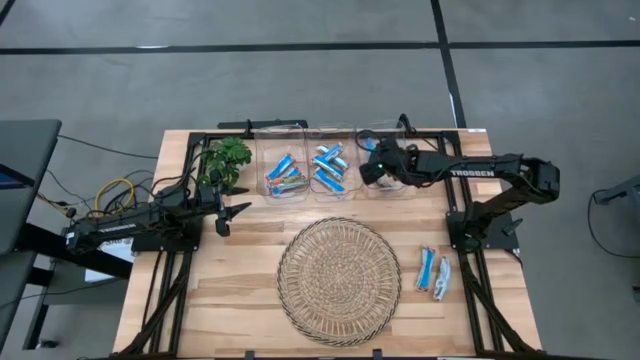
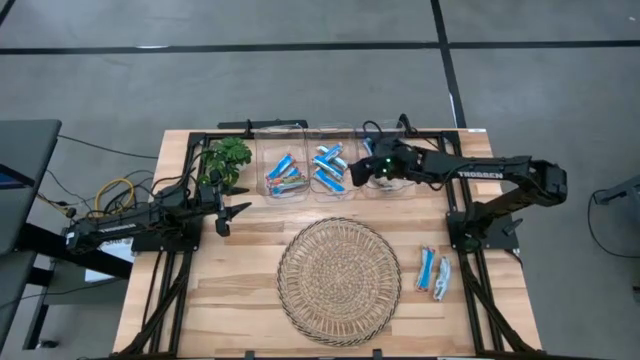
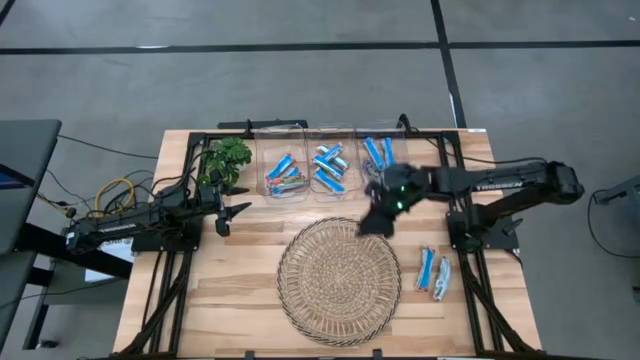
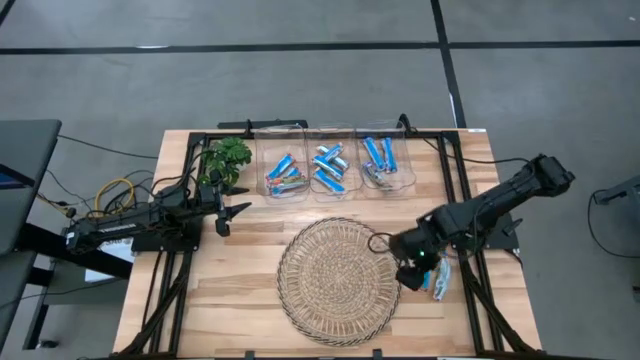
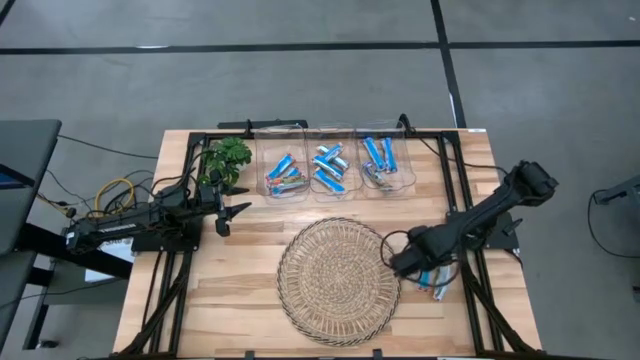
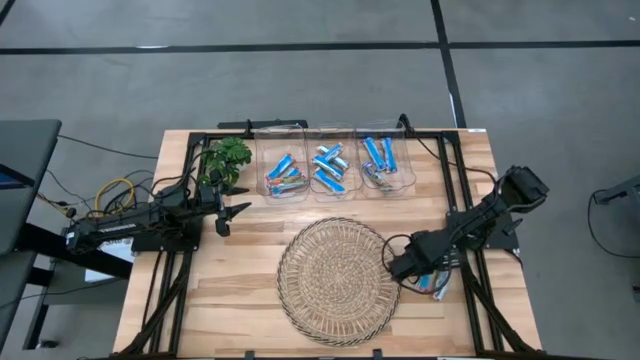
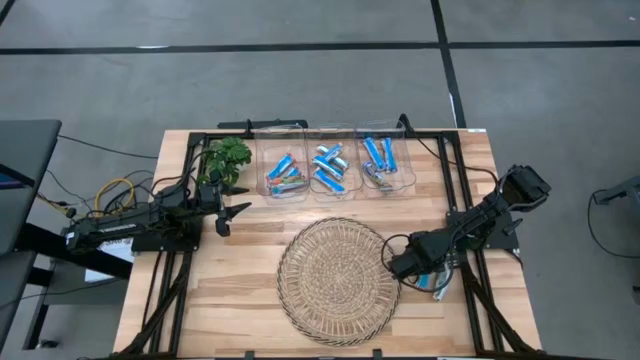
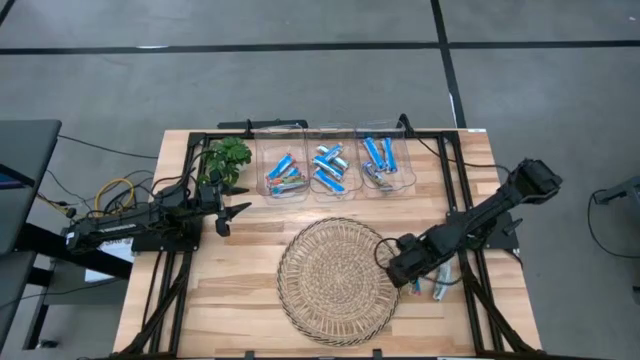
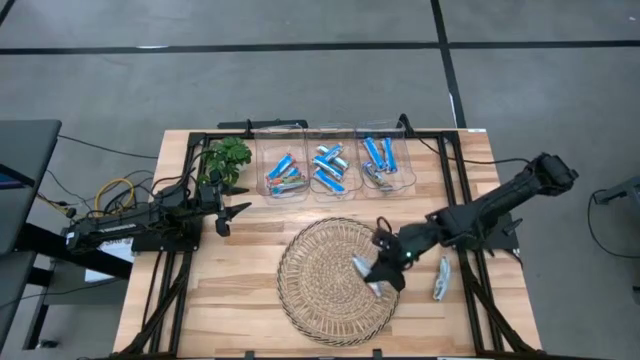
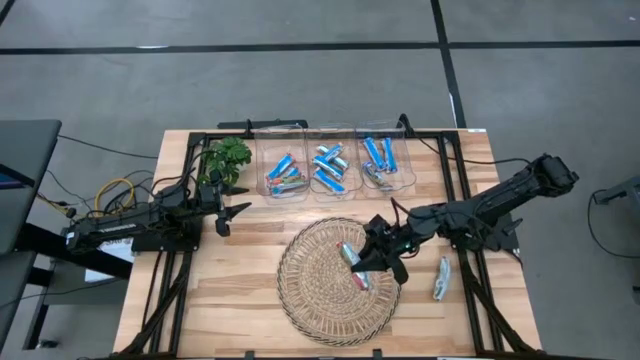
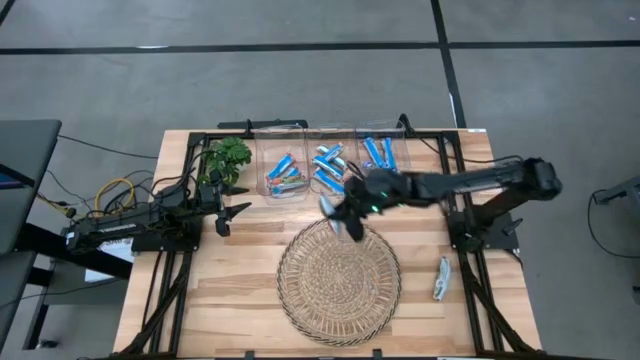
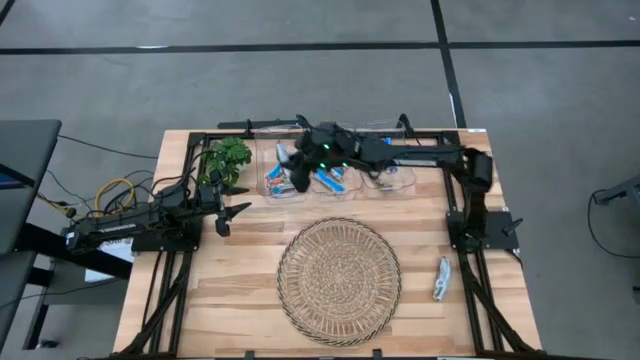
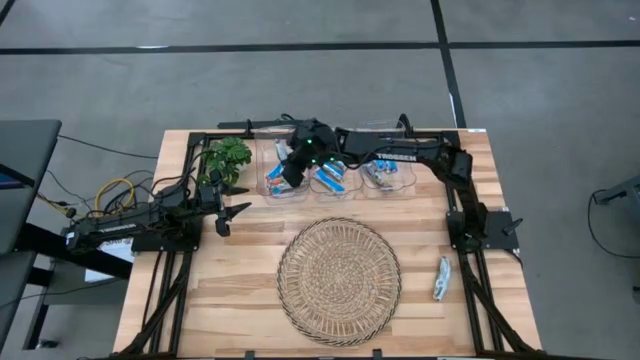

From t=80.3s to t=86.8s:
Task: Pick and place Granola Bars by type
Put the red granola bar into the left transparent bin

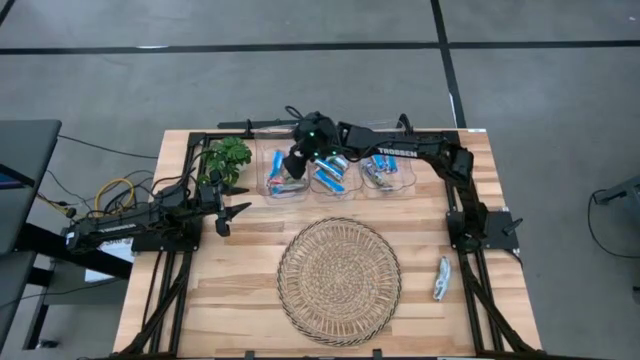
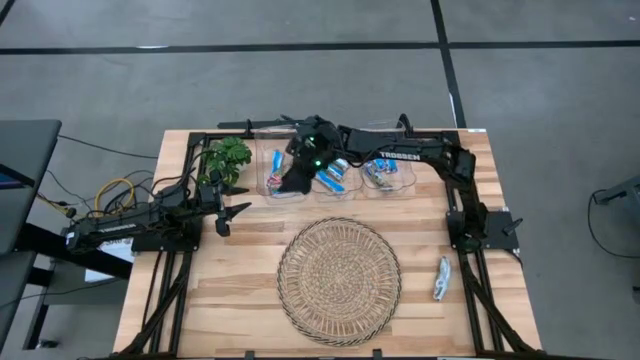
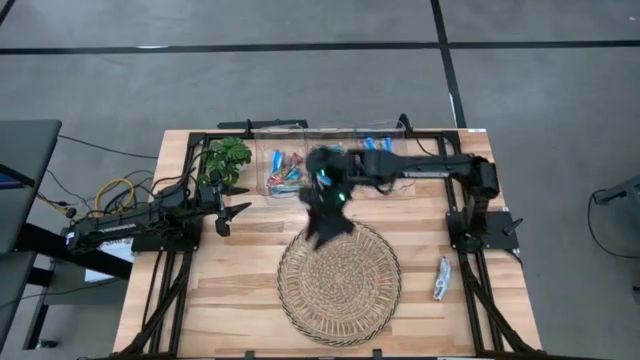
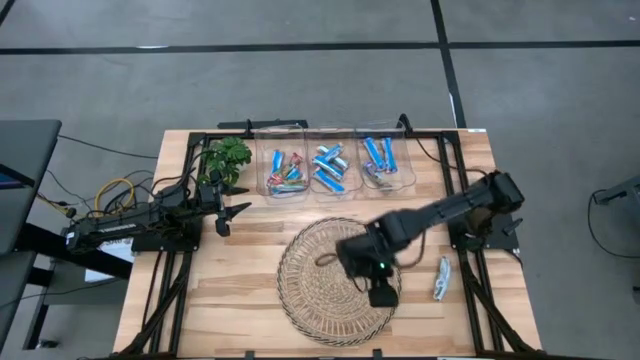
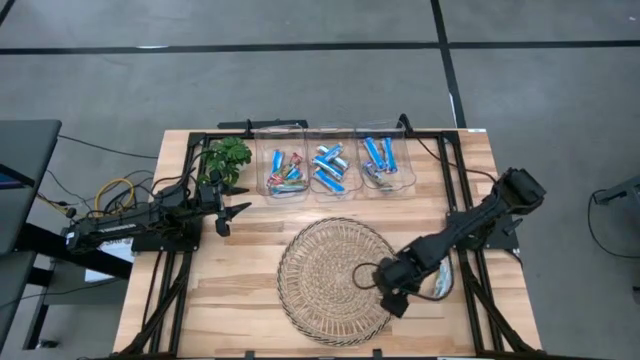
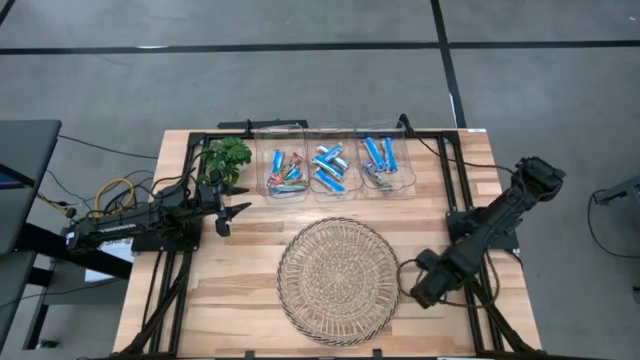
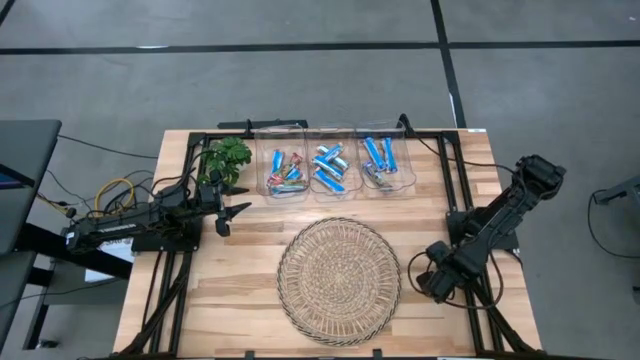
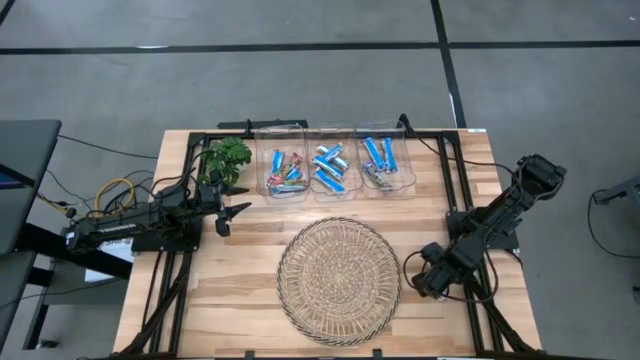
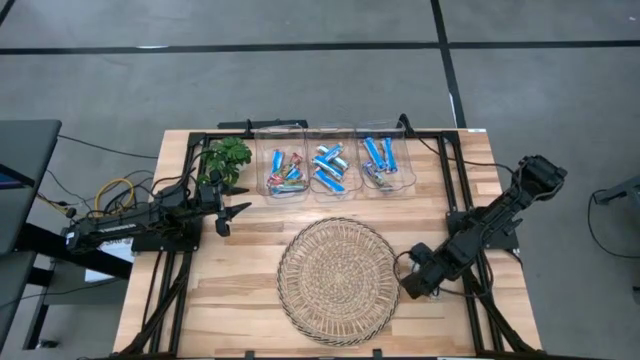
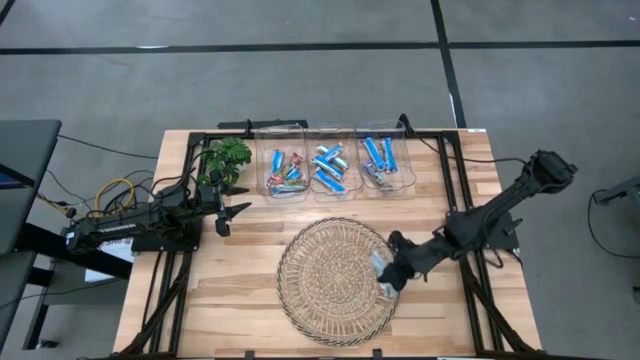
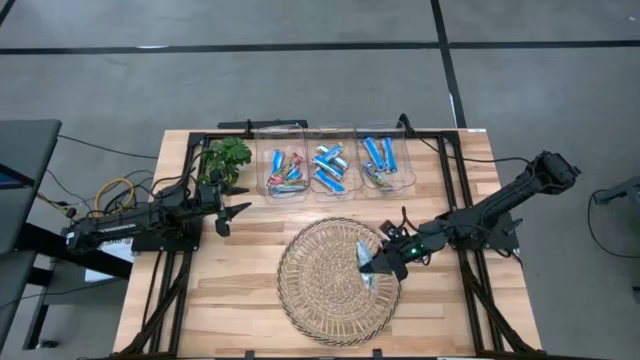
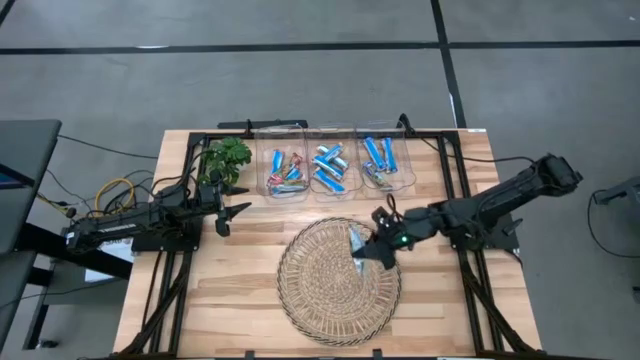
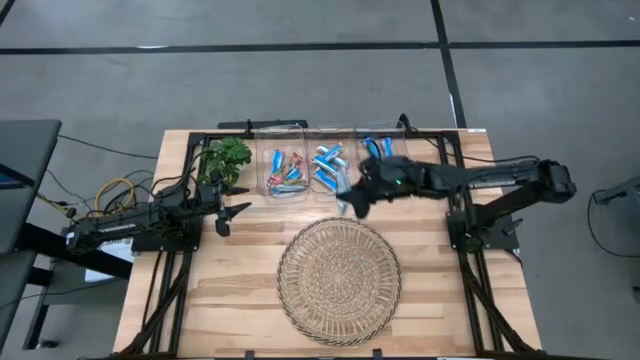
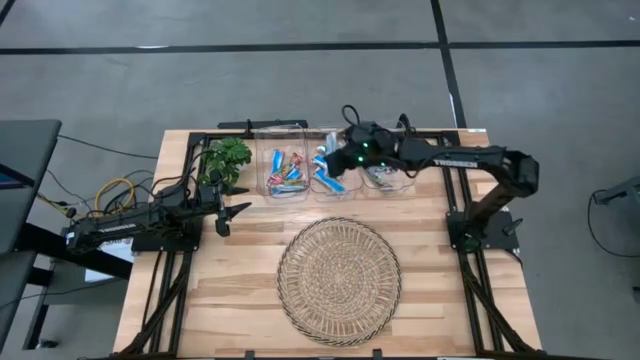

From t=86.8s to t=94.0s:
Put the yellow granola bar into the middle transparent bin

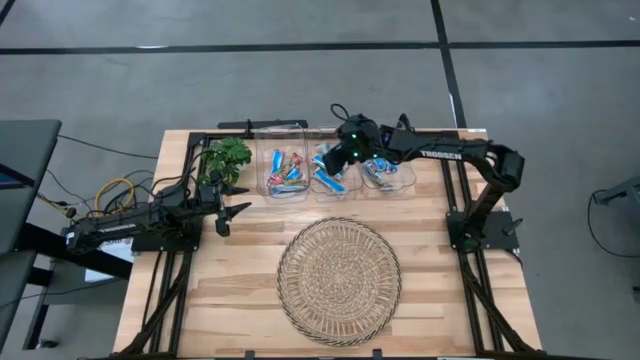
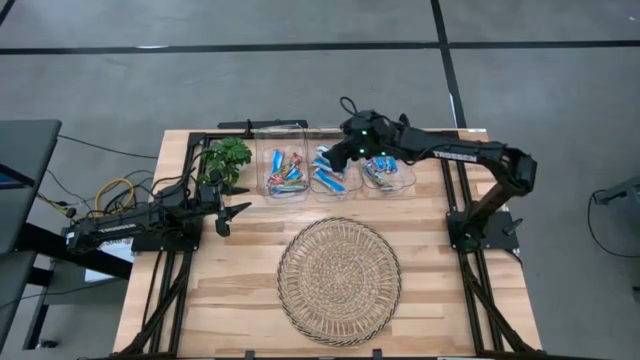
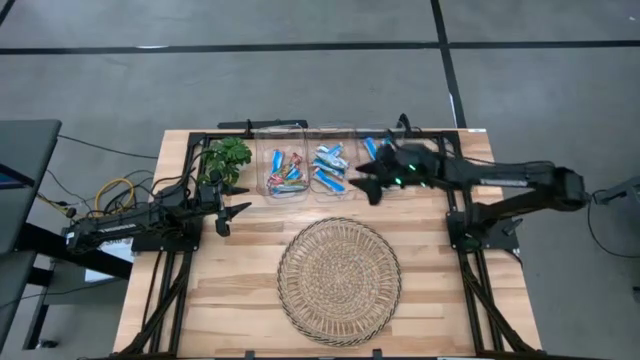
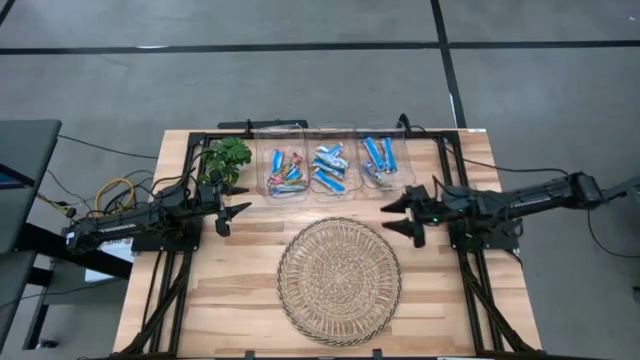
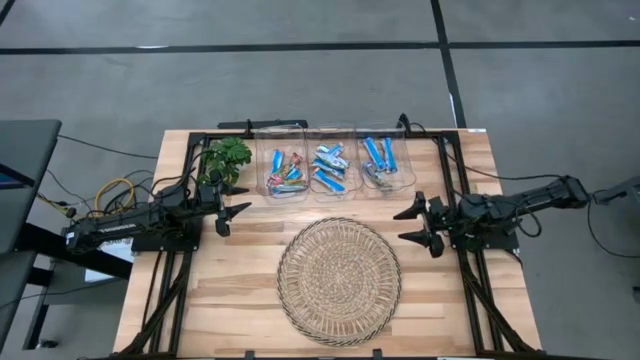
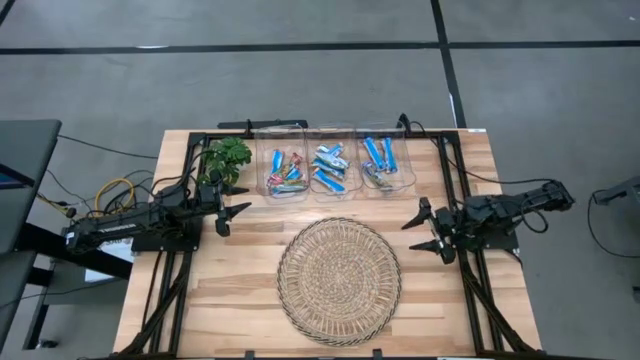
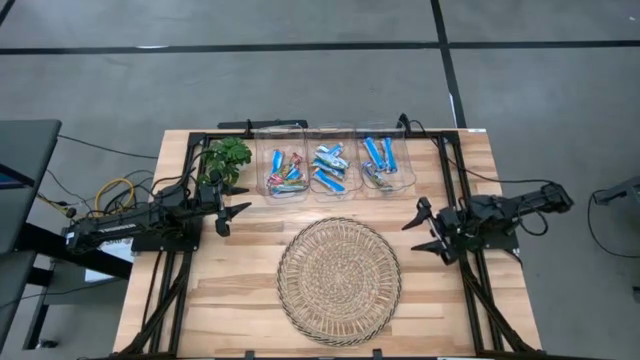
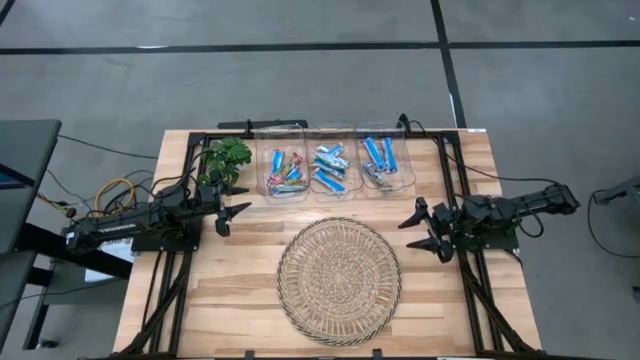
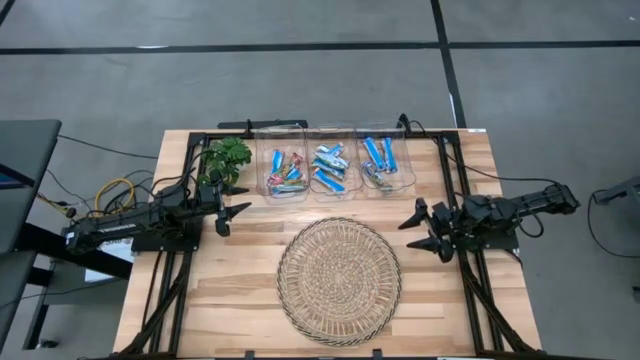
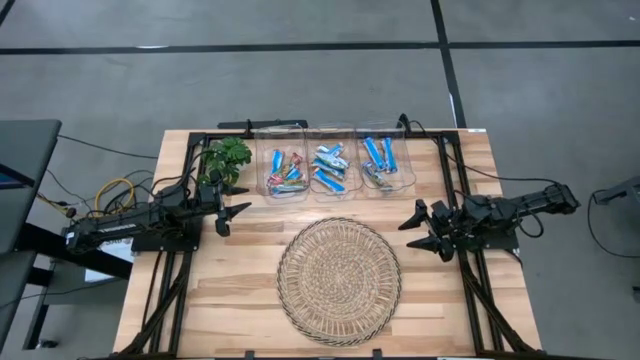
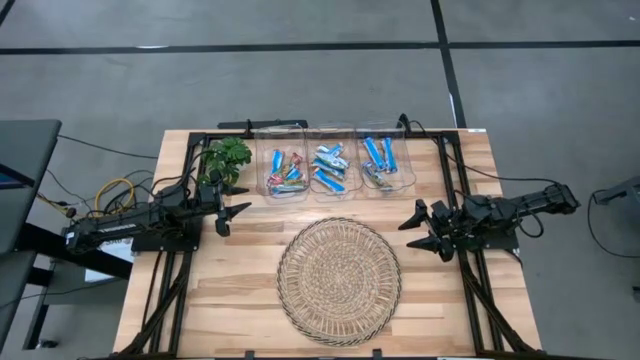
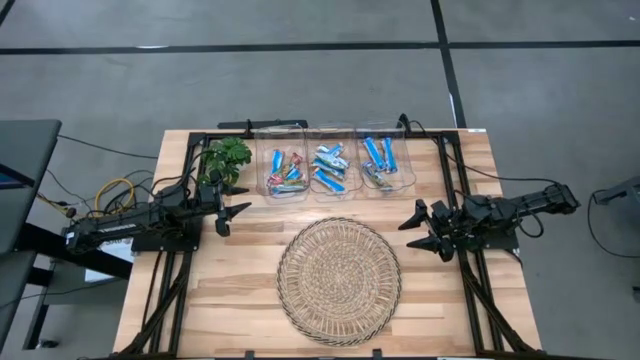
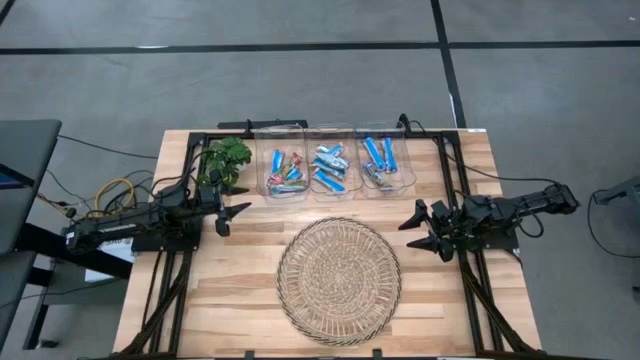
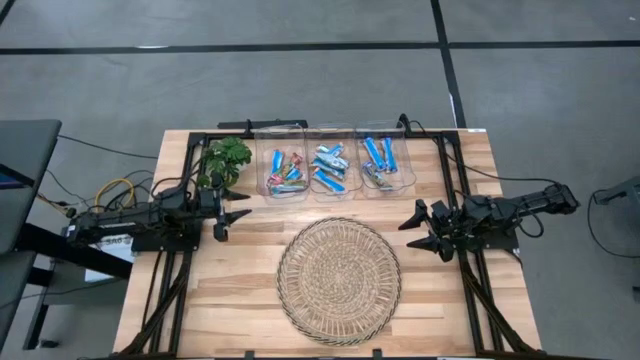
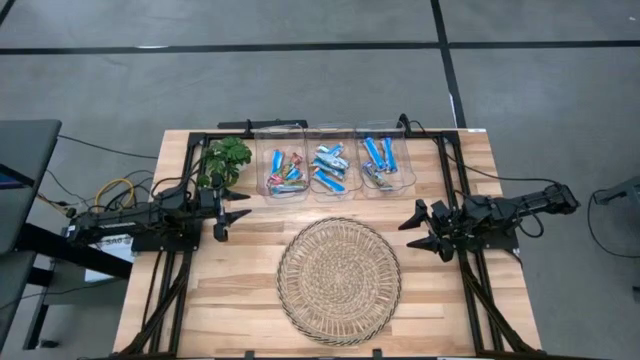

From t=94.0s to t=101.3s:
Return to Home Position
